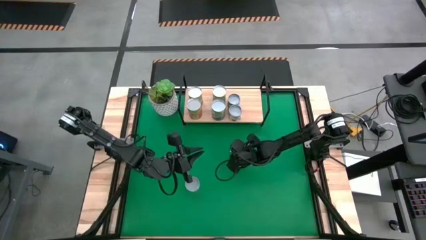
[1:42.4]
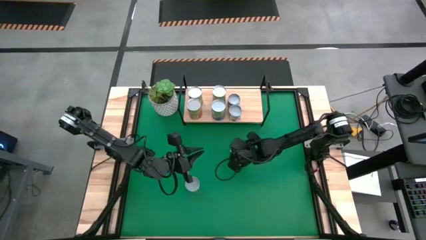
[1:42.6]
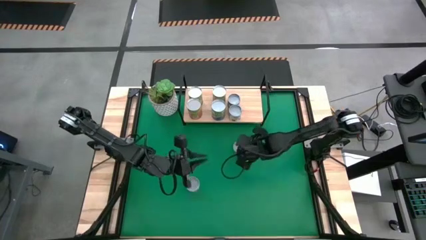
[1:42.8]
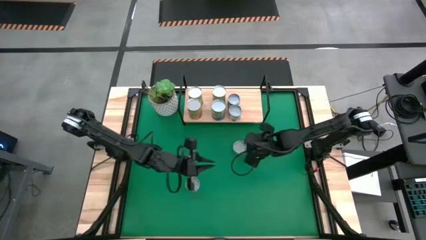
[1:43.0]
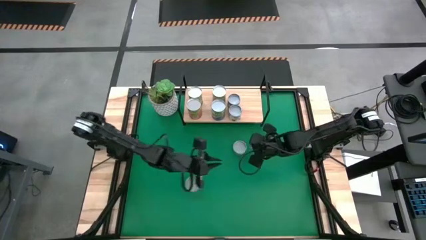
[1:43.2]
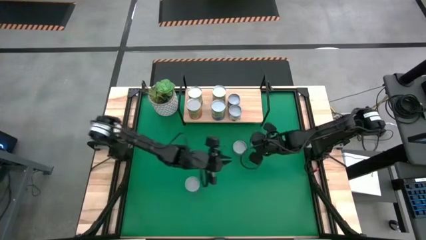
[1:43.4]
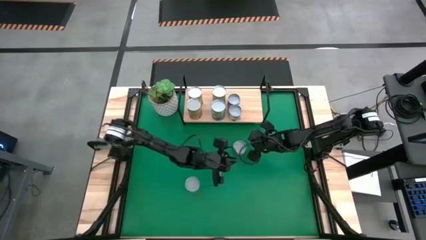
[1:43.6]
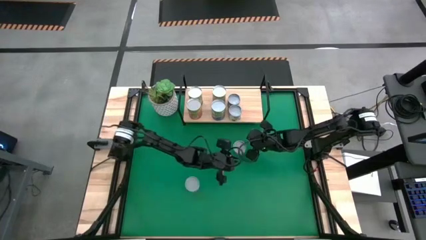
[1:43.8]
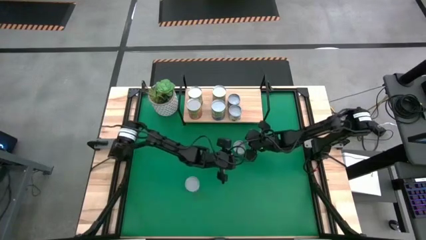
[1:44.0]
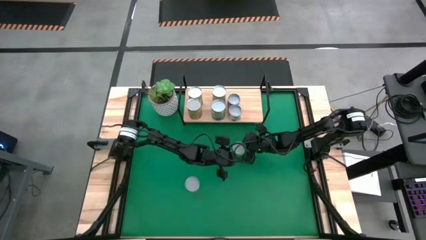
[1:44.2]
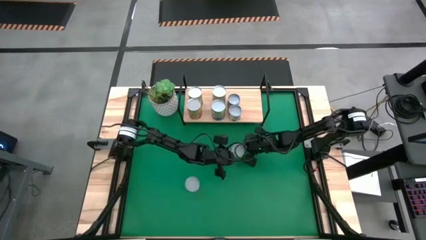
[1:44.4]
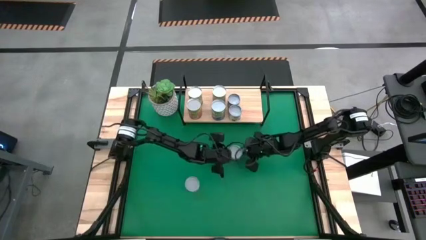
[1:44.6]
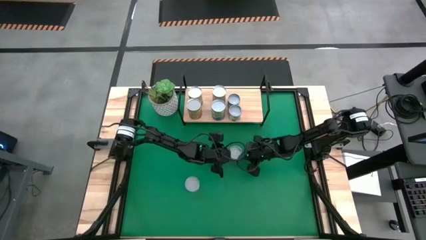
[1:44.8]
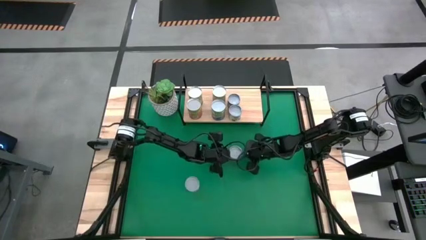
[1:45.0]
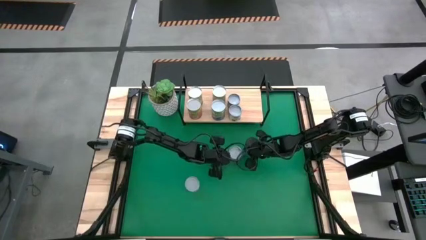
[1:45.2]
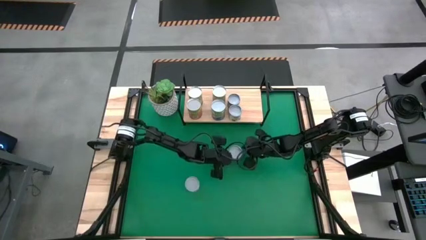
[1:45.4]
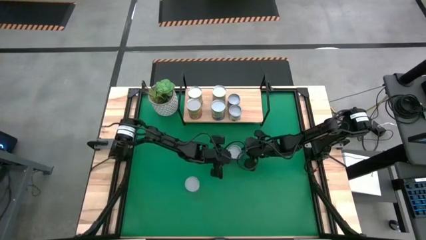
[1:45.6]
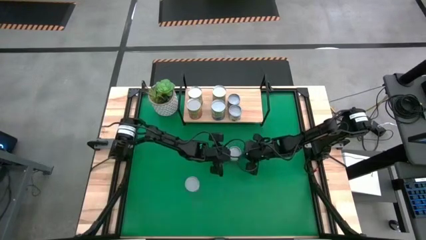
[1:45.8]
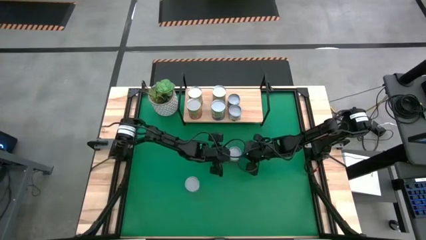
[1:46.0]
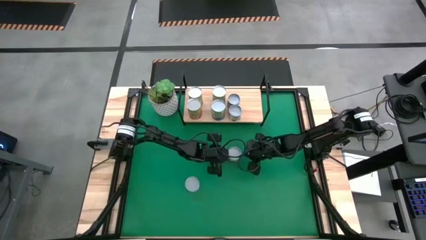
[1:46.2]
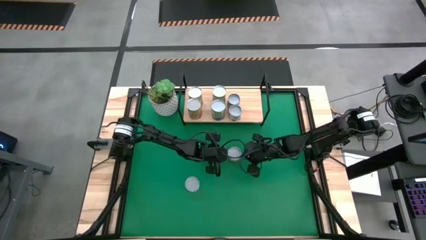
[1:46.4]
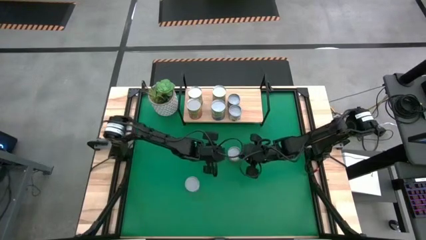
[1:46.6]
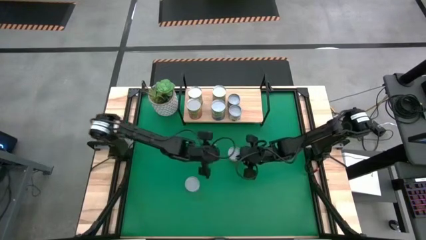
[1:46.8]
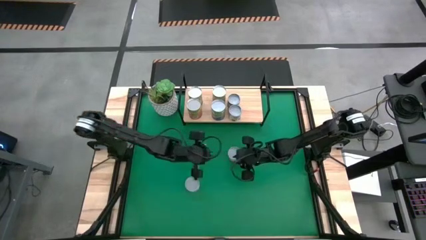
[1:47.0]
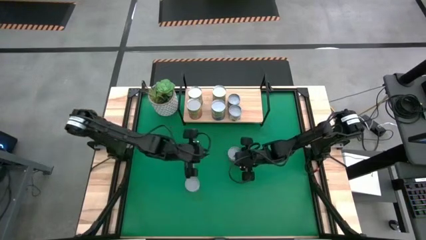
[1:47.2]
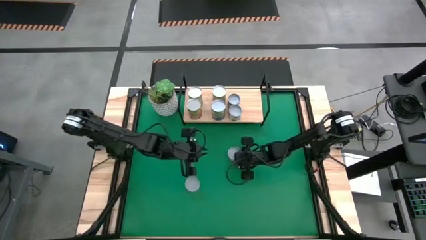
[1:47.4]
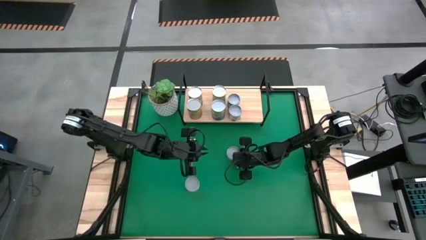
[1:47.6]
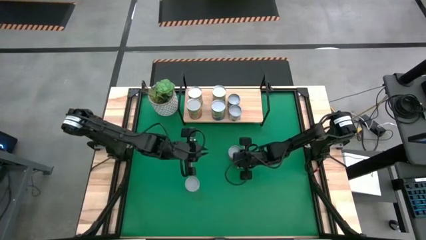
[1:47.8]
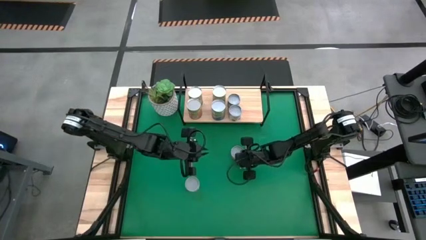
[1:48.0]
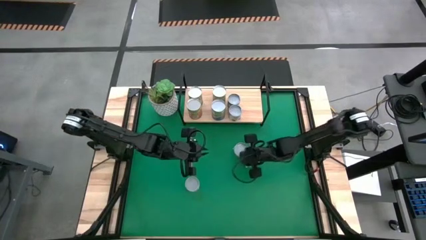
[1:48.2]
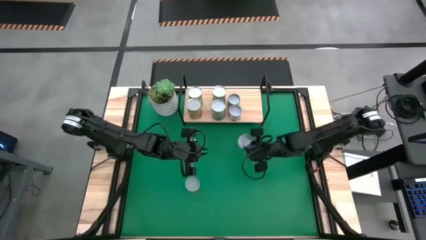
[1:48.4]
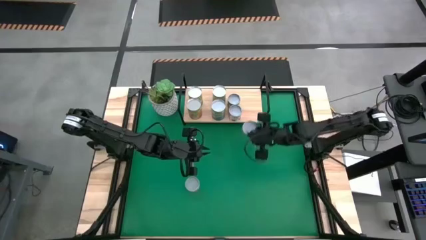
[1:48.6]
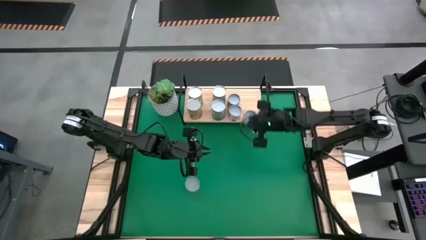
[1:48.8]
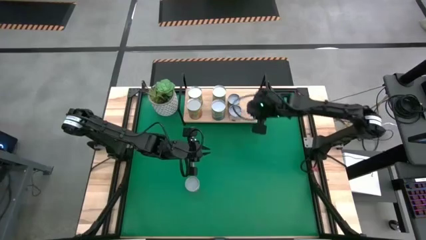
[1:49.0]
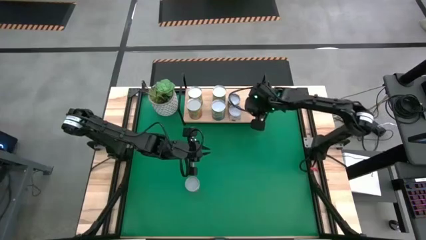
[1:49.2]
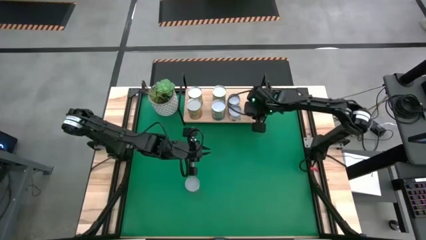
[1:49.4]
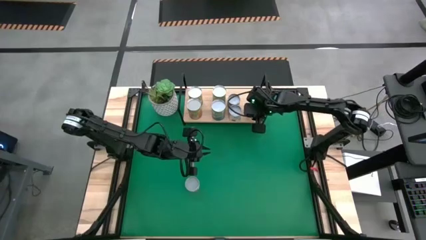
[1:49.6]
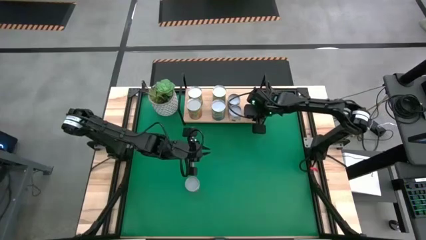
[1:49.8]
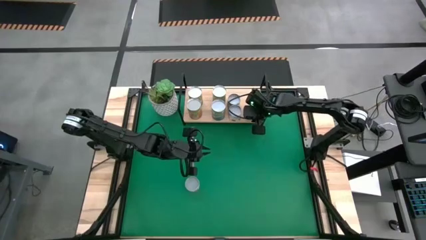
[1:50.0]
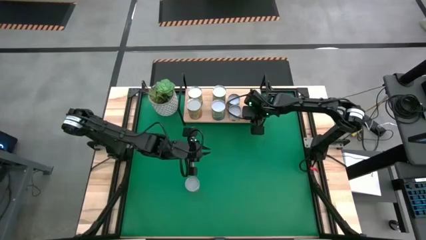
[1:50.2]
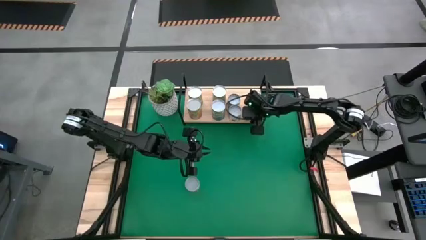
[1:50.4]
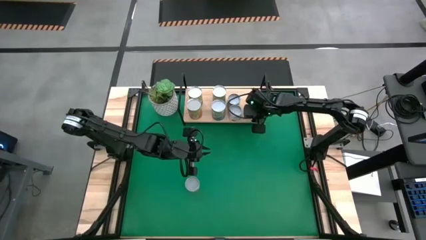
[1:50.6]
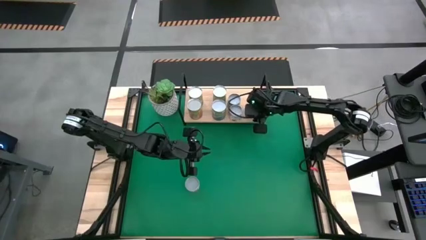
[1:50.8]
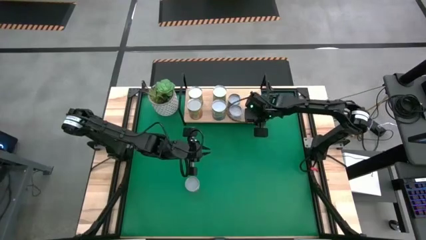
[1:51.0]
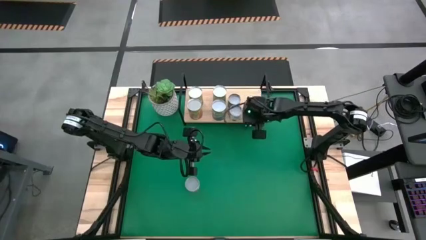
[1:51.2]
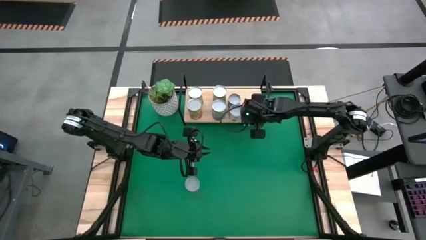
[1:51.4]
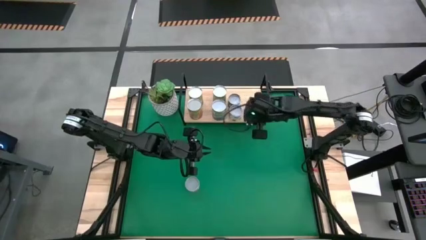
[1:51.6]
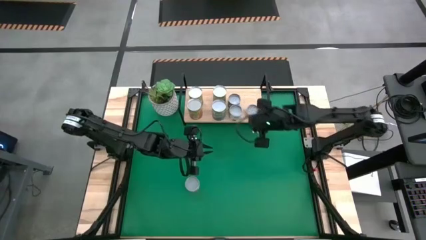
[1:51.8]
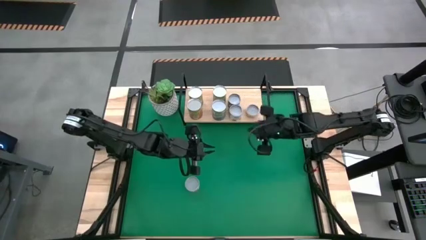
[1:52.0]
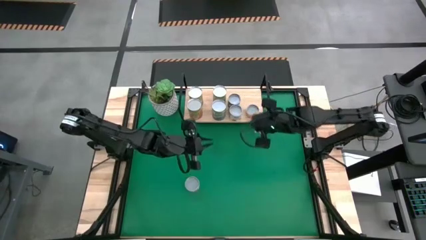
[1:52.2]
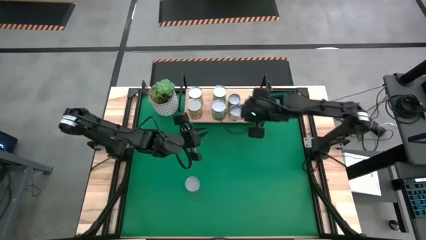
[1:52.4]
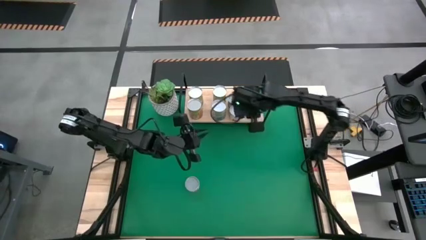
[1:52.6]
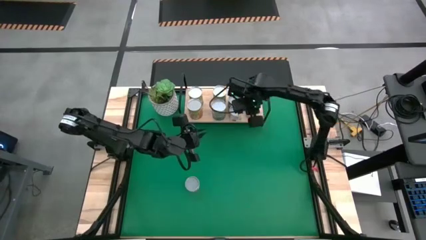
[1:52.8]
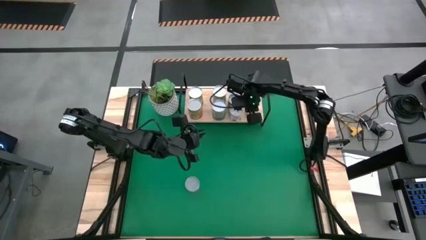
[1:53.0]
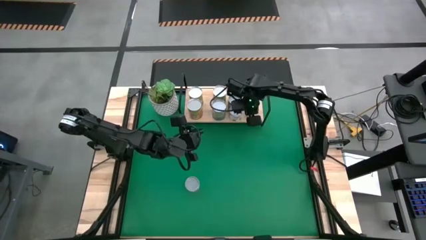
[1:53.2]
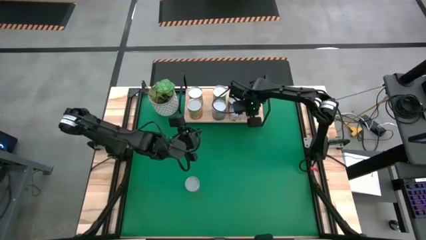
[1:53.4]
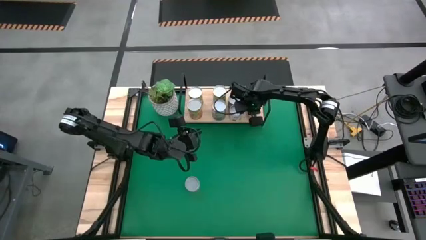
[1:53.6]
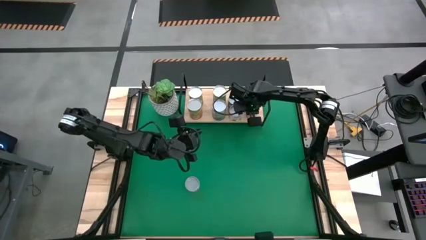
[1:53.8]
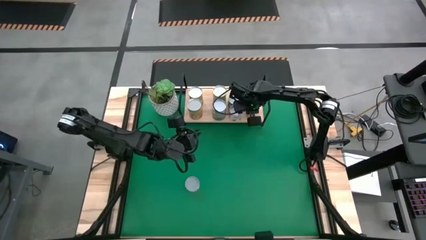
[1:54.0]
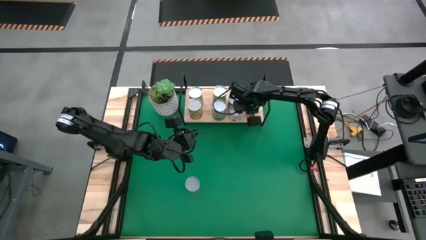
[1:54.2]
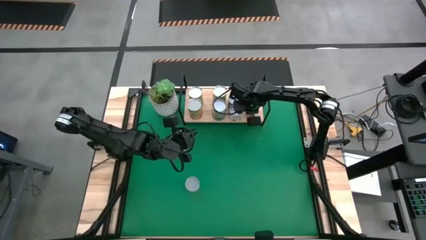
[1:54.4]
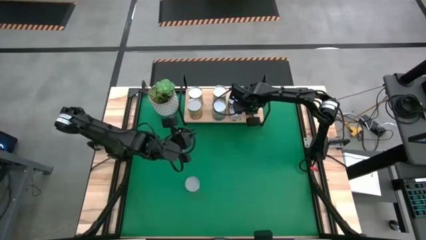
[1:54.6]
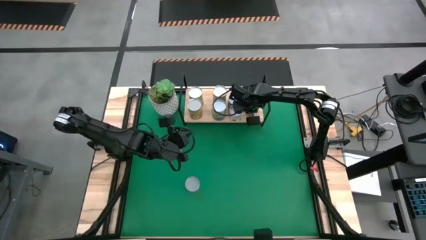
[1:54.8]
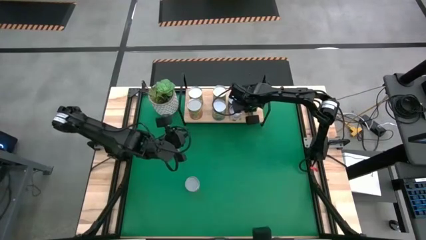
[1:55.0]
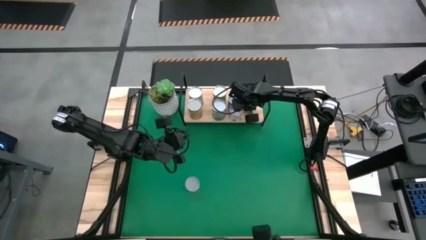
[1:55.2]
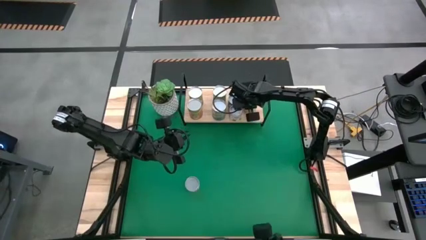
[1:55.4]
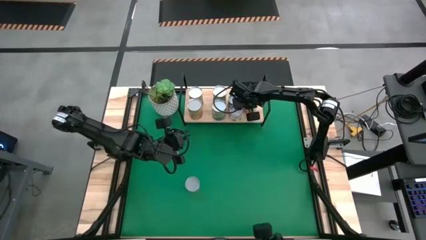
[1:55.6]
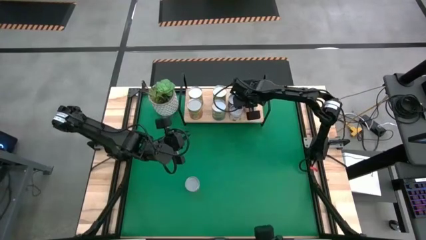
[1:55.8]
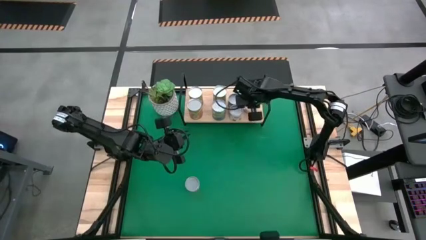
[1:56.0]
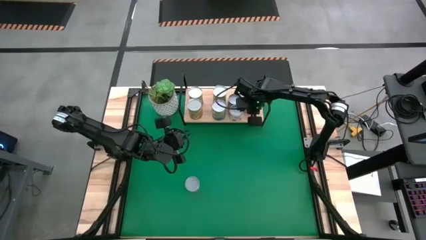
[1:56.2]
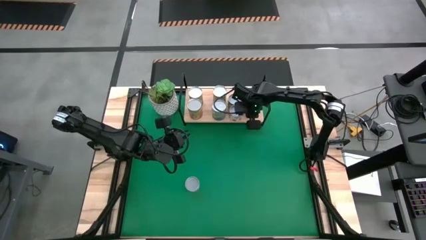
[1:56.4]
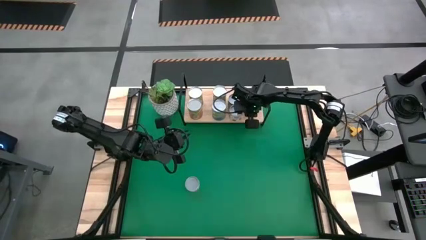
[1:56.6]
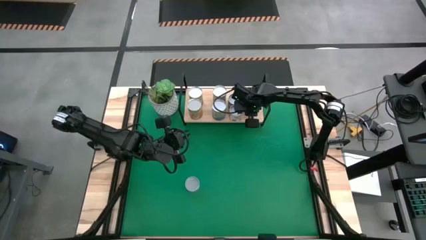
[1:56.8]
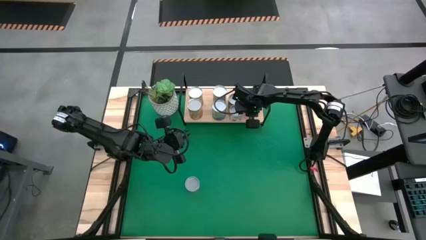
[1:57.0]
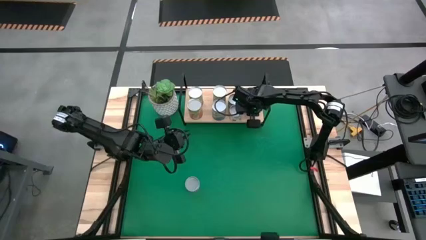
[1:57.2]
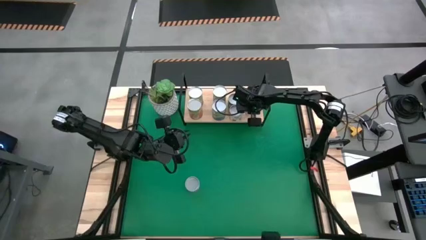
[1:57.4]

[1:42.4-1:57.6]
Task: Pick and place cans onto a shelf
Put the canned mushrooms on the shelf
